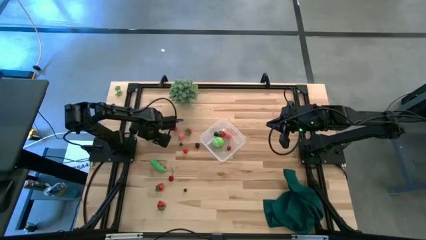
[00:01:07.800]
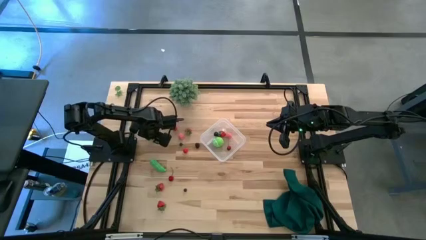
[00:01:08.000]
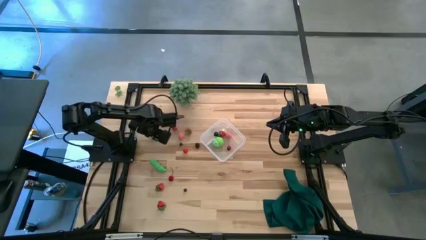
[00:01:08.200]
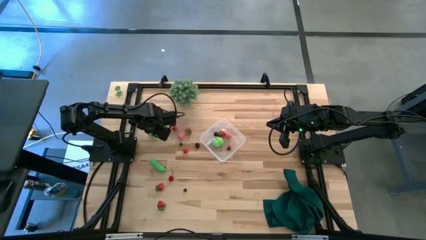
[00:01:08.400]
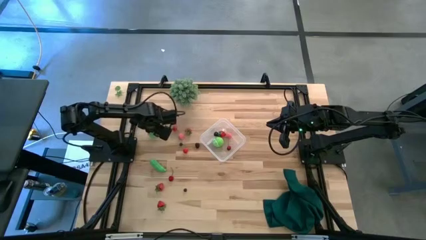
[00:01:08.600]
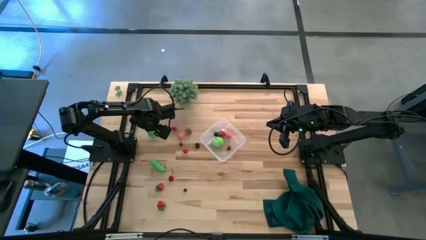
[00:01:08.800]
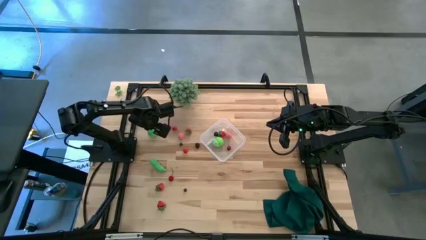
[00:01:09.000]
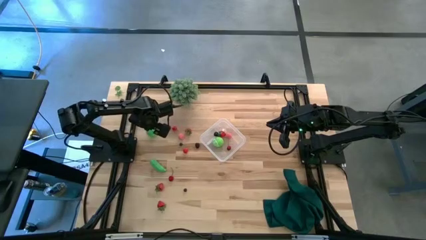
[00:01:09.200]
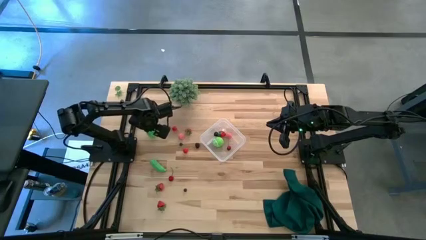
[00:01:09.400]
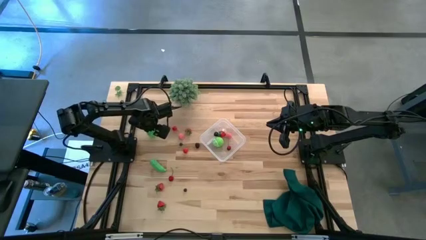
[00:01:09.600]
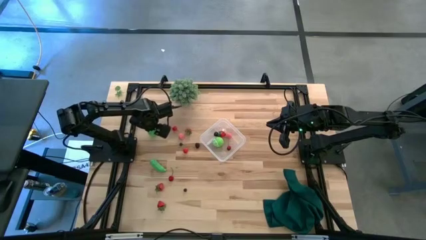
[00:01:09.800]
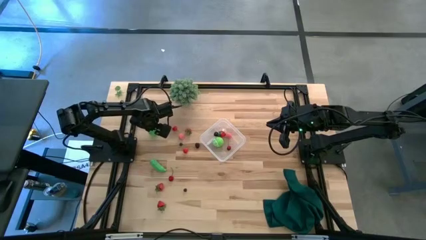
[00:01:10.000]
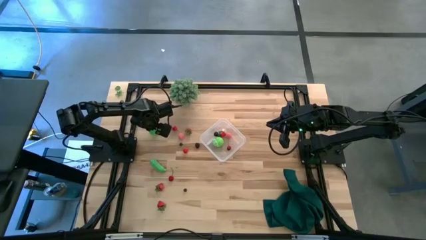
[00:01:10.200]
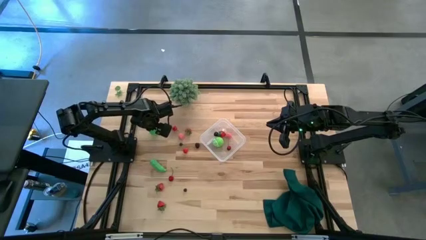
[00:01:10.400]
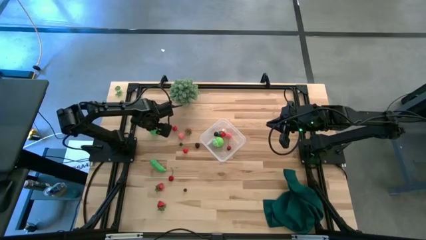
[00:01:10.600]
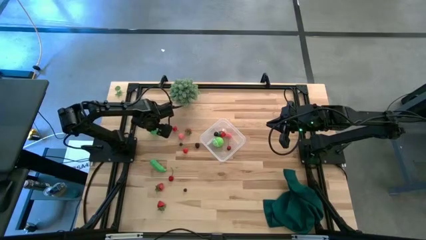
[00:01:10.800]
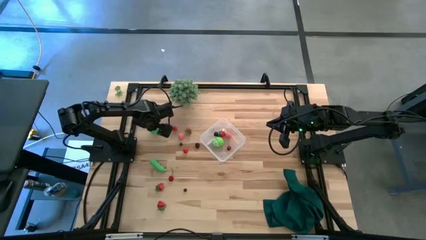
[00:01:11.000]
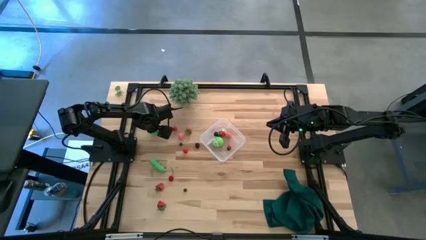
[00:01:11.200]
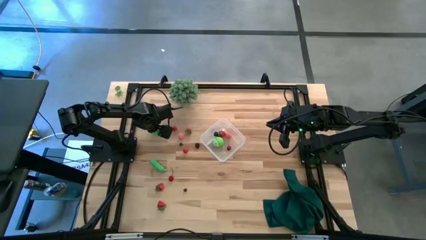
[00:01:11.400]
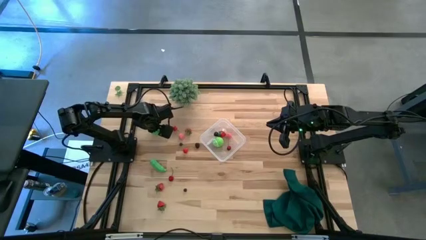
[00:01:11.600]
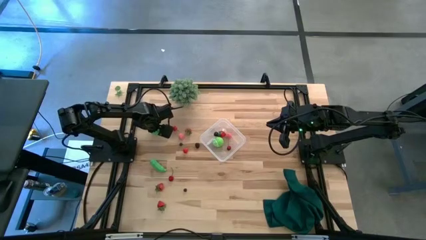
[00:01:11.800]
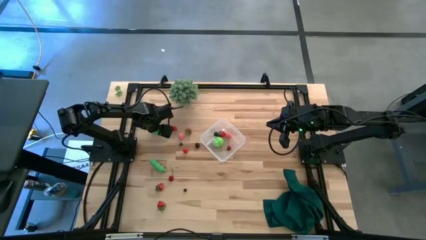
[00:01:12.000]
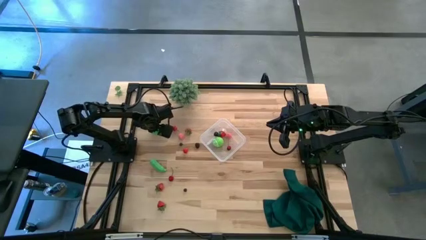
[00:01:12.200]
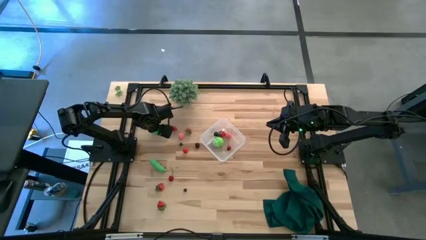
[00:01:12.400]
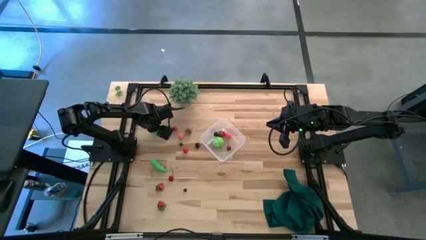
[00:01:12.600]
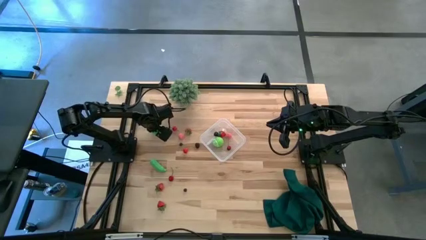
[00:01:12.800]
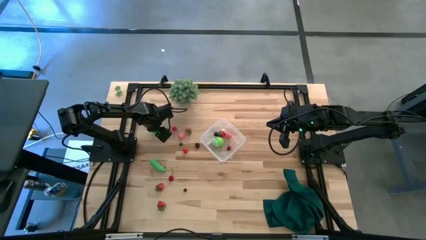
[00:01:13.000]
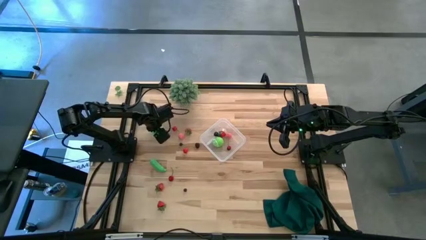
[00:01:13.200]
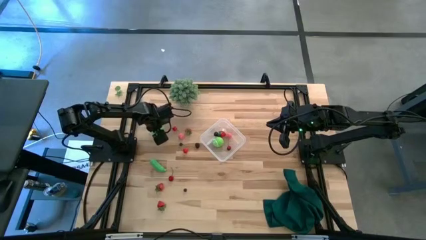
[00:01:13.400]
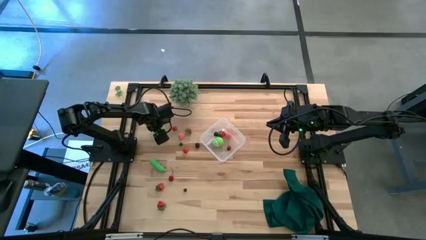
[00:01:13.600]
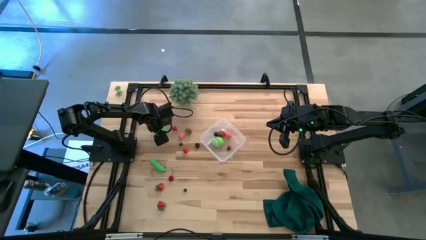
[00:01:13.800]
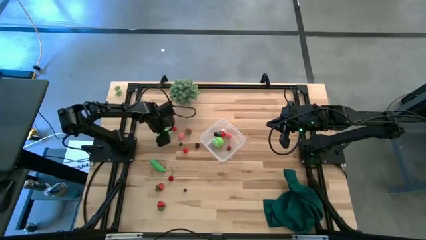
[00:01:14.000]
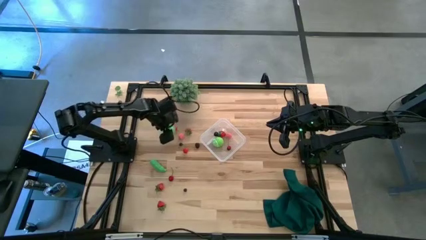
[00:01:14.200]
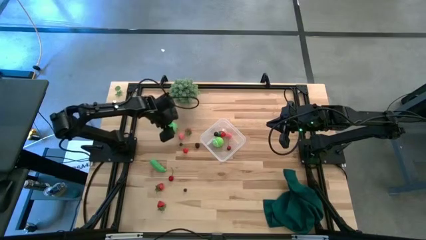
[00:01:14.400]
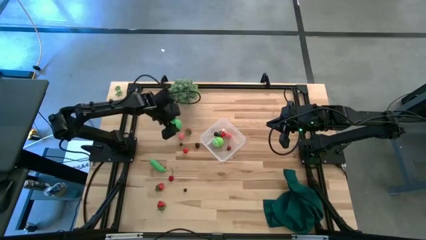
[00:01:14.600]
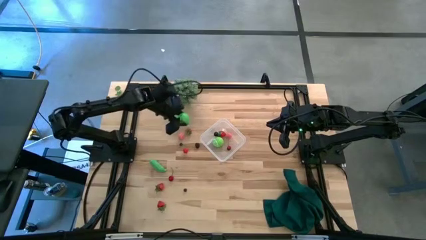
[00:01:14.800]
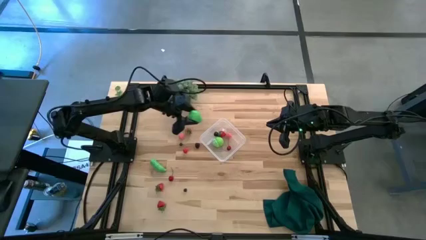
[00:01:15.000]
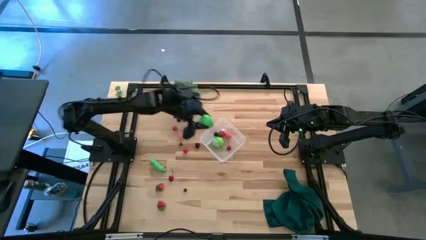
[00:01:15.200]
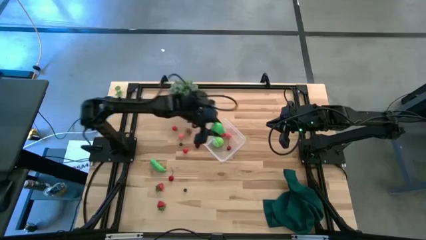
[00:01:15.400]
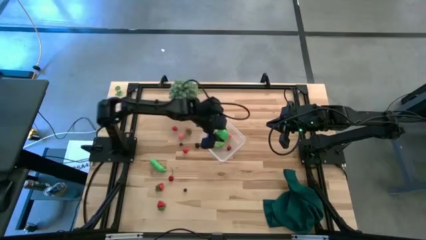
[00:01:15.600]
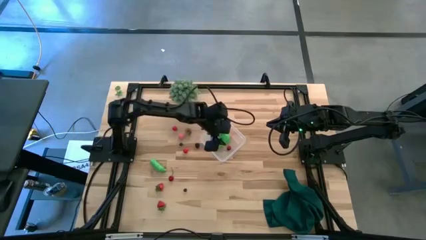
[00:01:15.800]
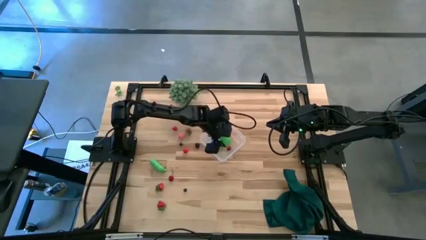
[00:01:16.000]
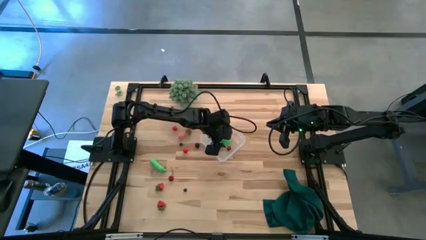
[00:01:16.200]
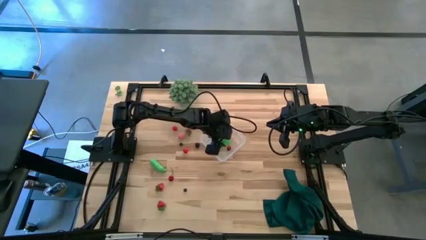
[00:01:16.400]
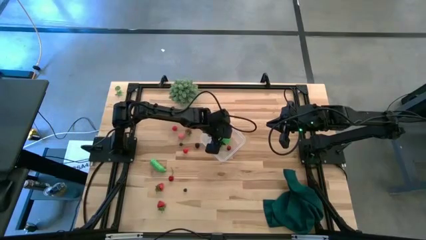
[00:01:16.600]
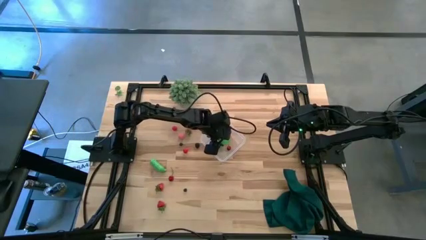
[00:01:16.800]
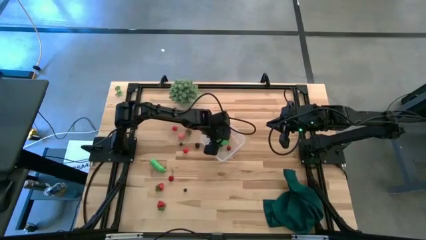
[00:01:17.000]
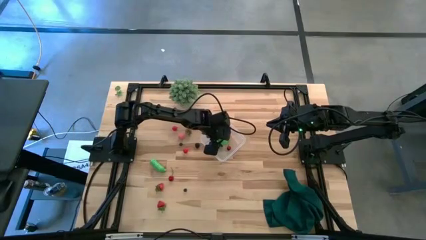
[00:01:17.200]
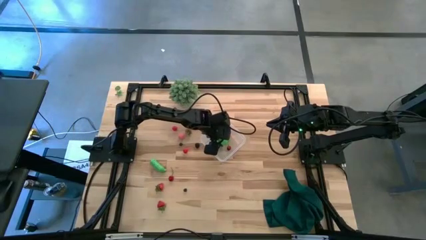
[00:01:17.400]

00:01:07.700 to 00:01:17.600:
Task: Pick and placing Produce into tupperware
Put the green pear into the transparent bin

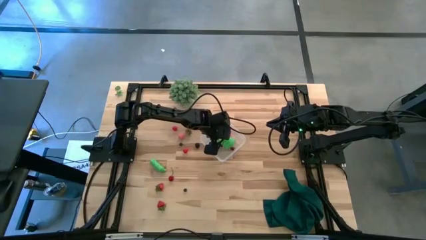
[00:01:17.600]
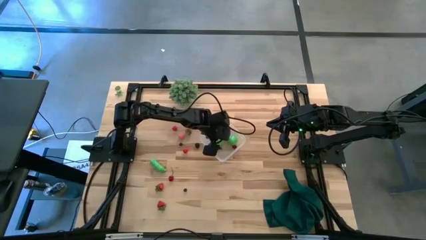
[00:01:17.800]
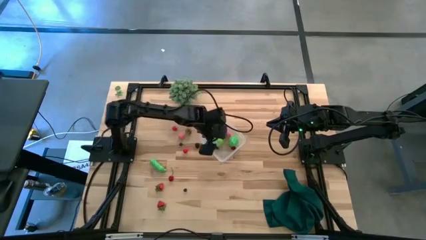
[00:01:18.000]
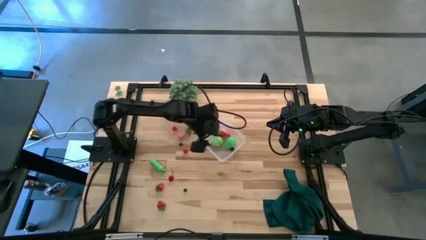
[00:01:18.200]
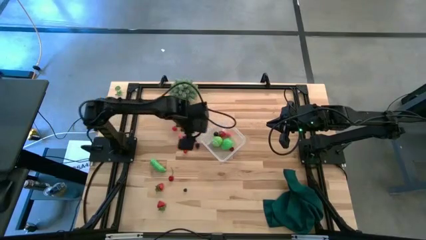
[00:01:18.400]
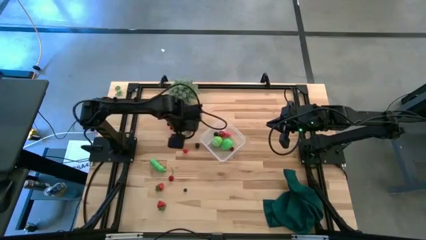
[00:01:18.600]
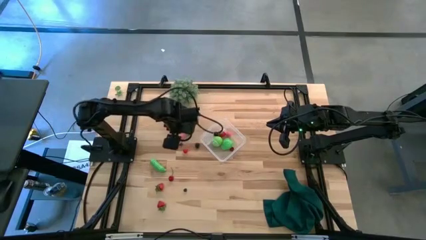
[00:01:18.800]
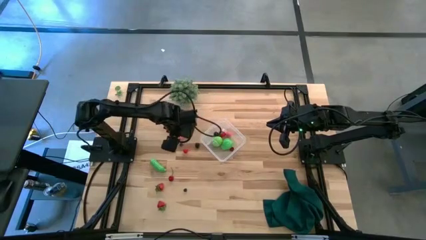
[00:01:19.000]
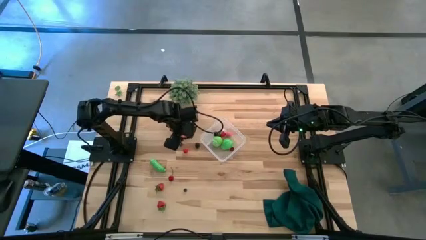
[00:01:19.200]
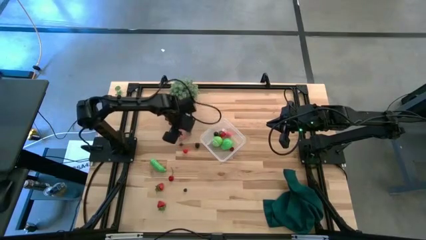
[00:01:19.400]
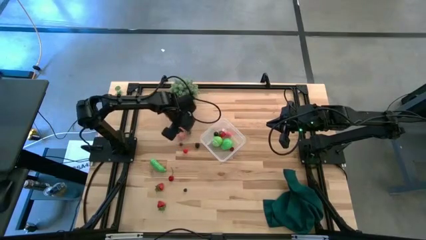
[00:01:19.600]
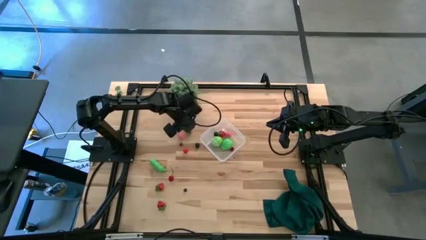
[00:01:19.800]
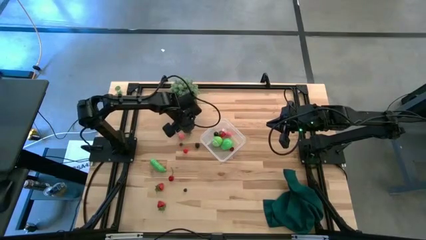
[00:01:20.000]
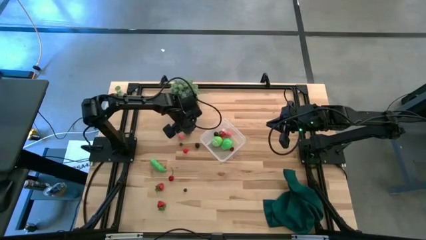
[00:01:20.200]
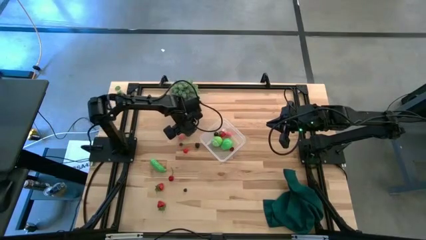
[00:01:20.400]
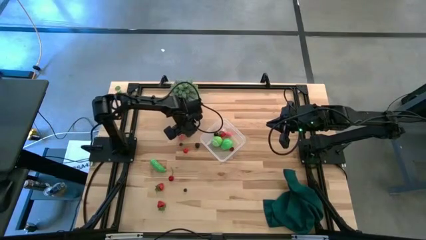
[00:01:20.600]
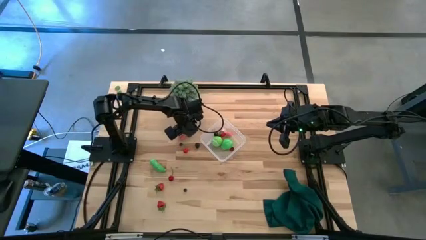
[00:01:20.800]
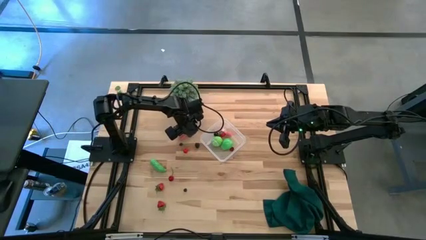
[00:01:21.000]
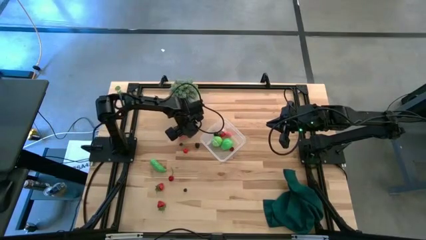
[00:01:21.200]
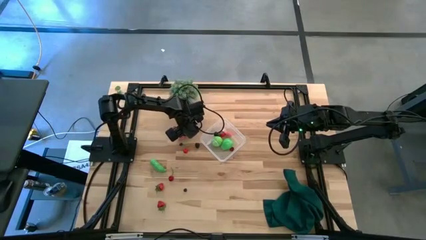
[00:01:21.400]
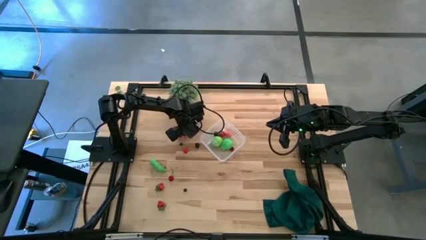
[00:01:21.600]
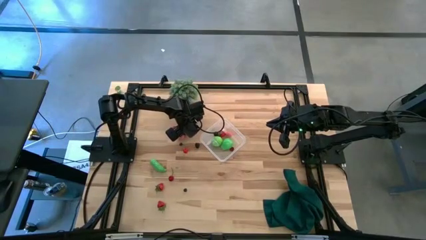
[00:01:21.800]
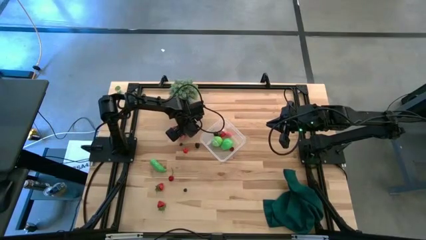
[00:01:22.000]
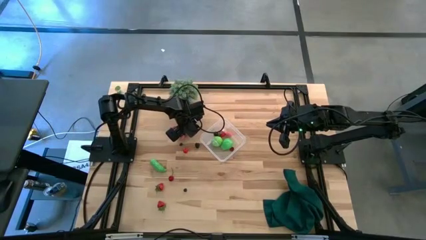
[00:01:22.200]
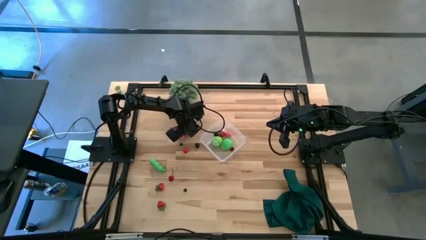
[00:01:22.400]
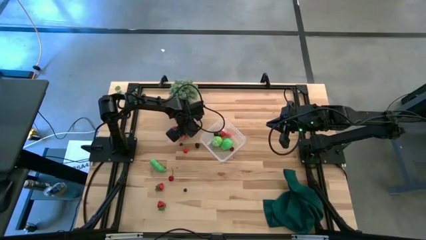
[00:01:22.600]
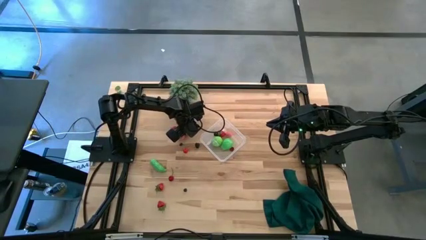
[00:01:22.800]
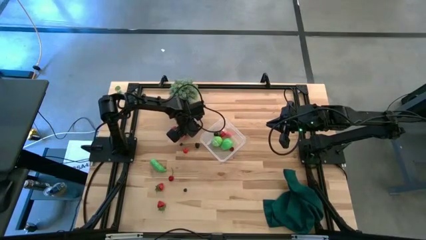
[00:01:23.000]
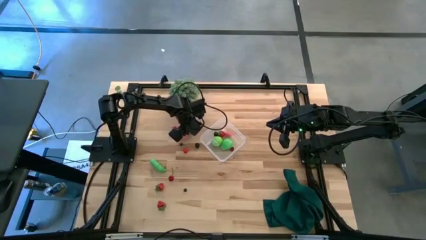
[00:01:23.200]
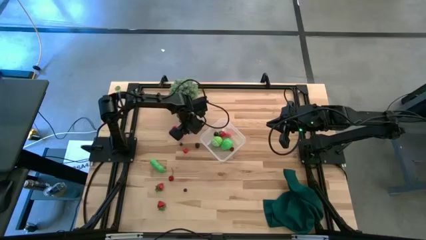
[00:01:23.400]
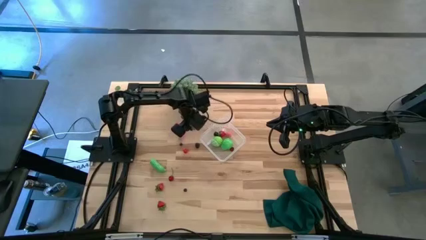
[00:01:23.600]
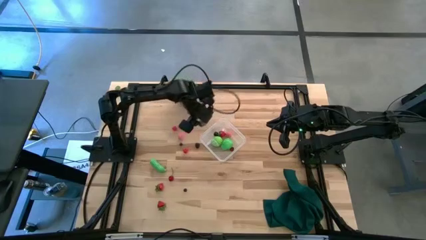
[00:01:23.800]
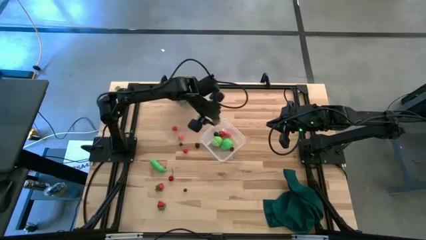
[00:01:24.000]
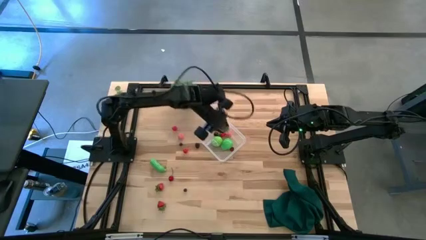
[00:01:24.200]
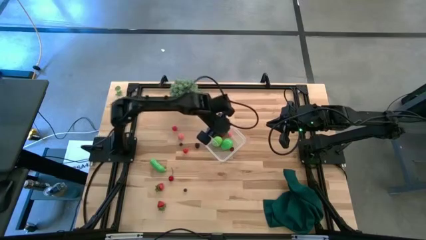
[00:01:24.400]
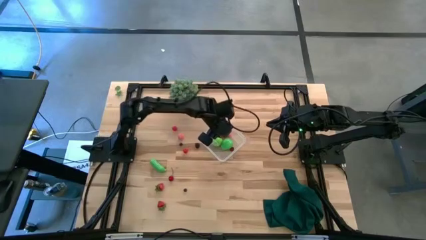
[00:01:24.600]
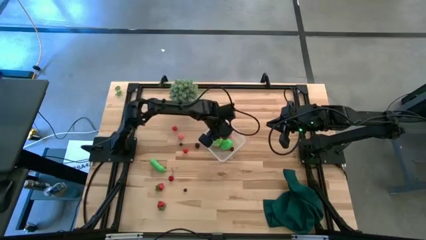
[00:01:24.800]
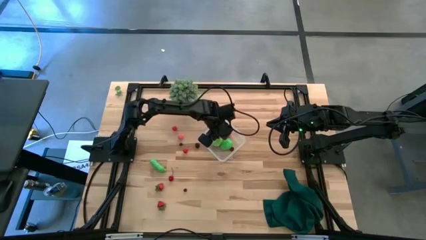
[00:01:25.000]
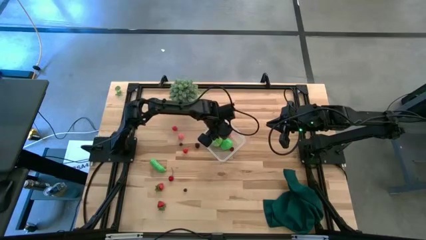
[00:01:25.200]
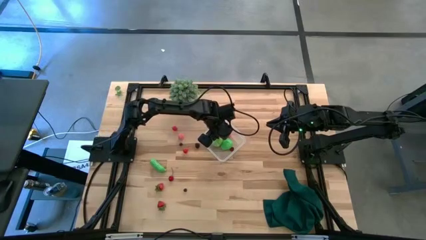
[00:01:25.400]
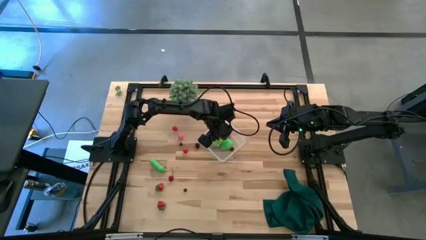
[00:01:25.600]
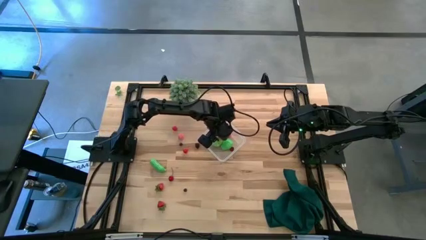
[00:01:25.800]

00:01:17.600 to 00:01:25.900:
Put the red strawberry into the transparent bin
